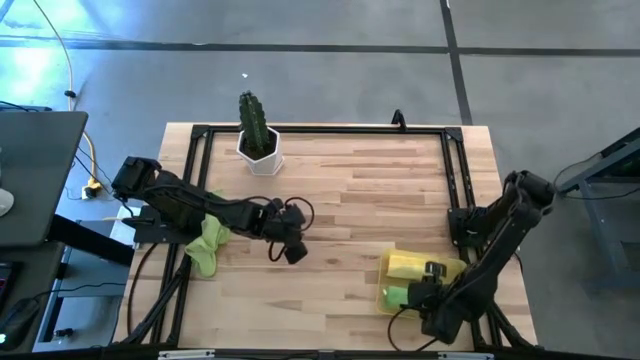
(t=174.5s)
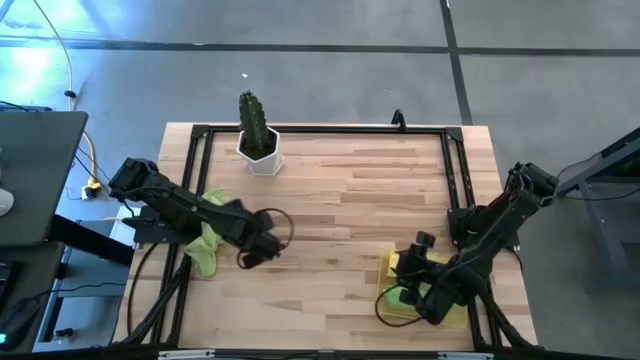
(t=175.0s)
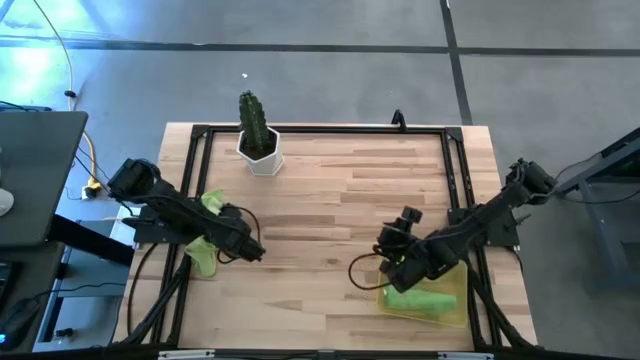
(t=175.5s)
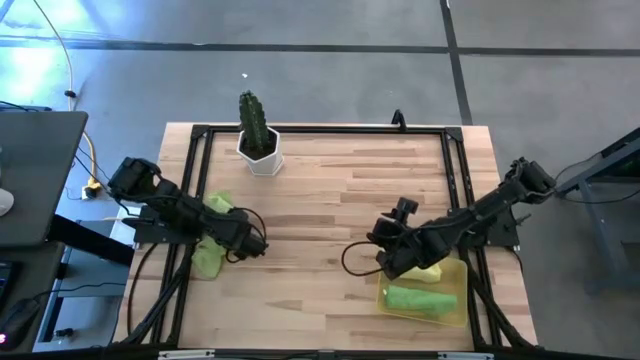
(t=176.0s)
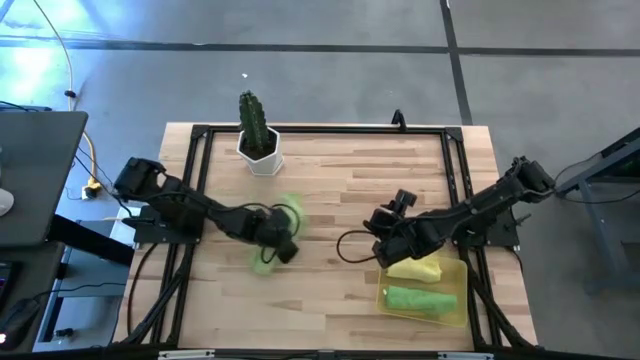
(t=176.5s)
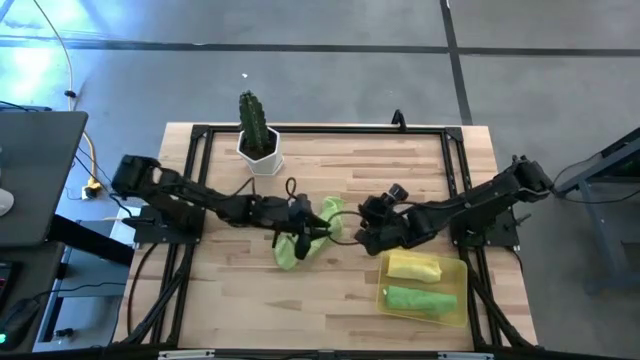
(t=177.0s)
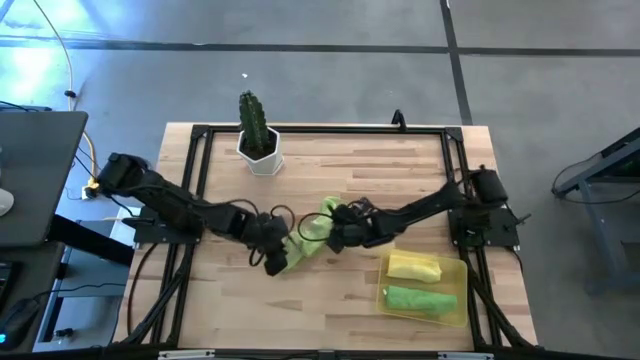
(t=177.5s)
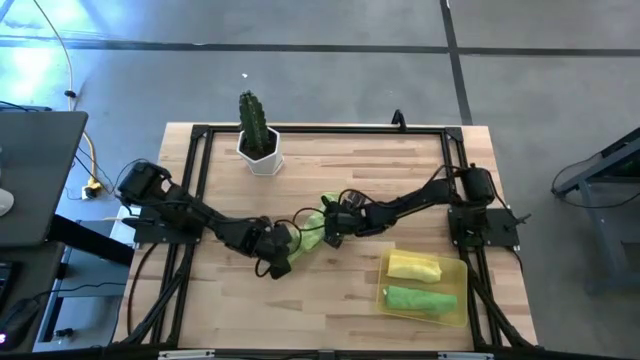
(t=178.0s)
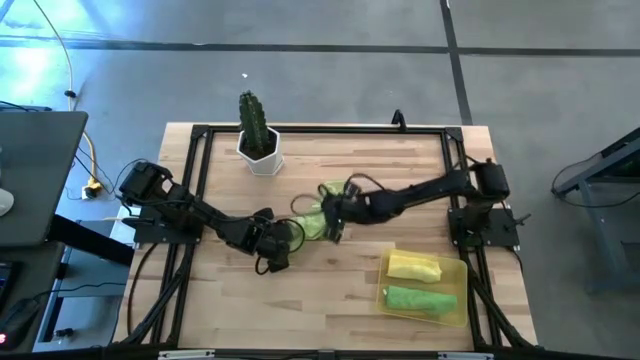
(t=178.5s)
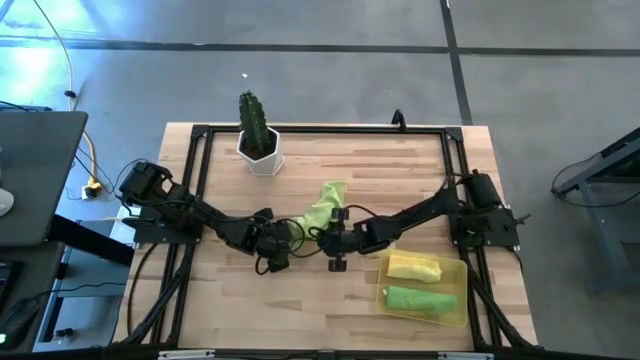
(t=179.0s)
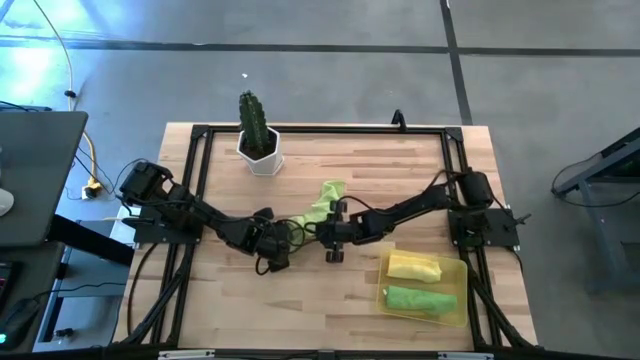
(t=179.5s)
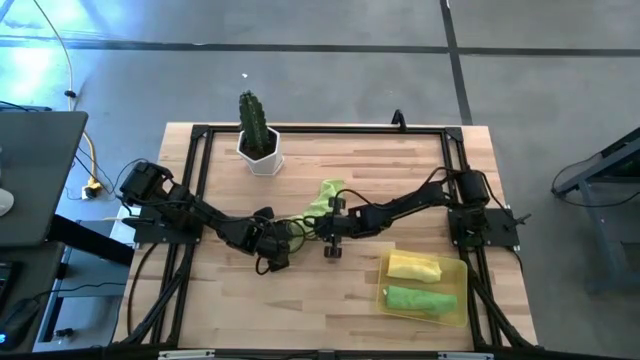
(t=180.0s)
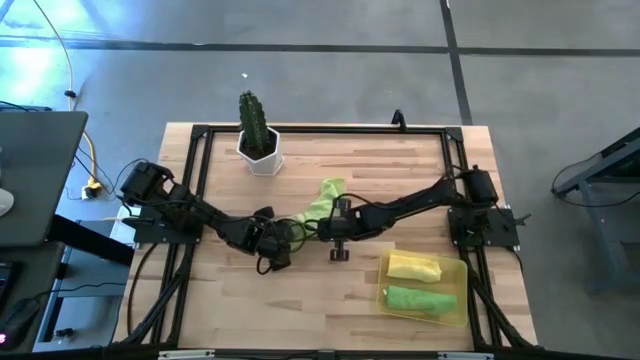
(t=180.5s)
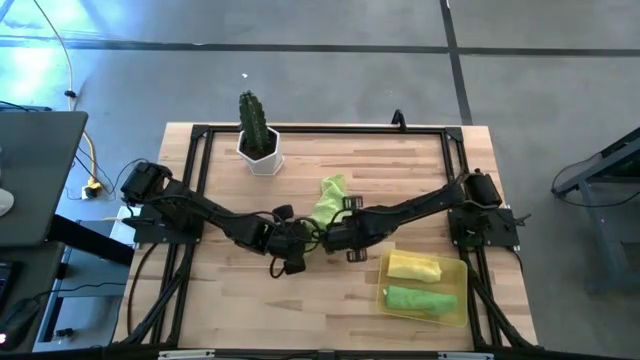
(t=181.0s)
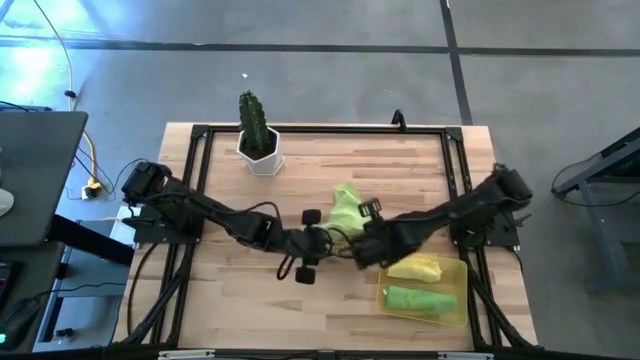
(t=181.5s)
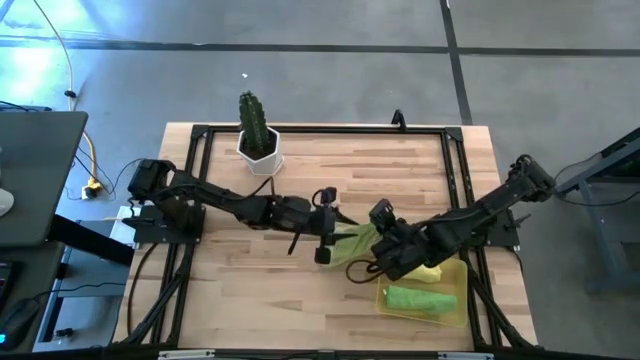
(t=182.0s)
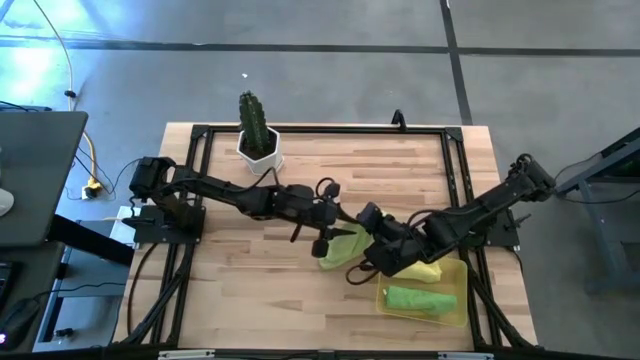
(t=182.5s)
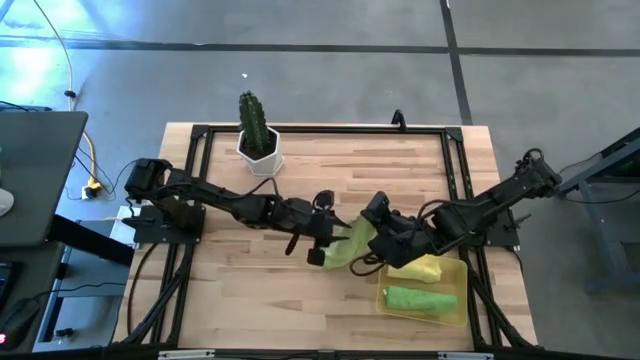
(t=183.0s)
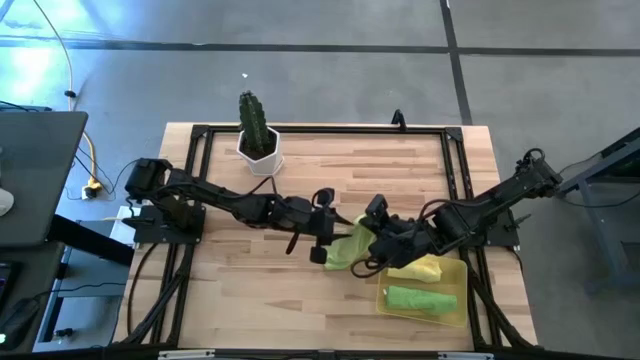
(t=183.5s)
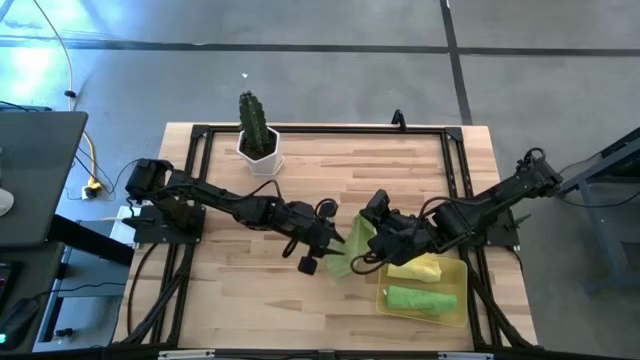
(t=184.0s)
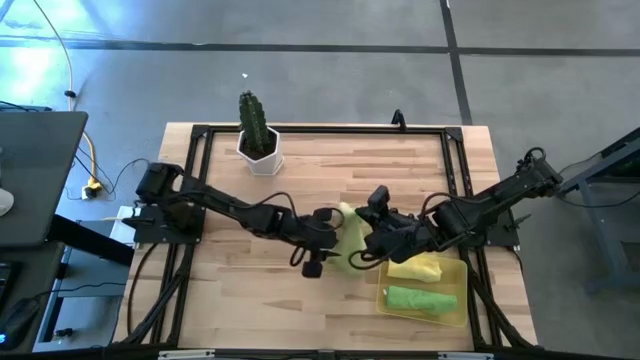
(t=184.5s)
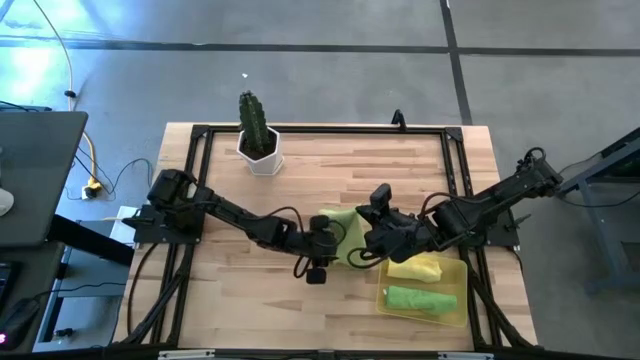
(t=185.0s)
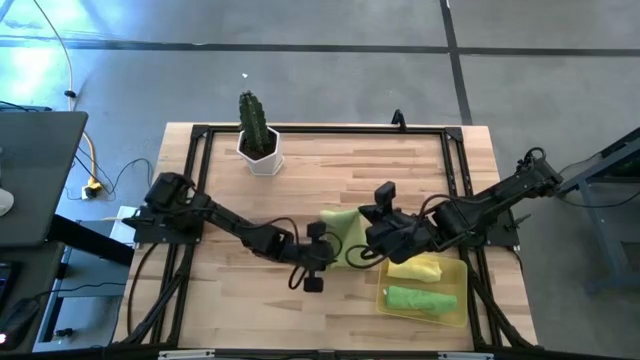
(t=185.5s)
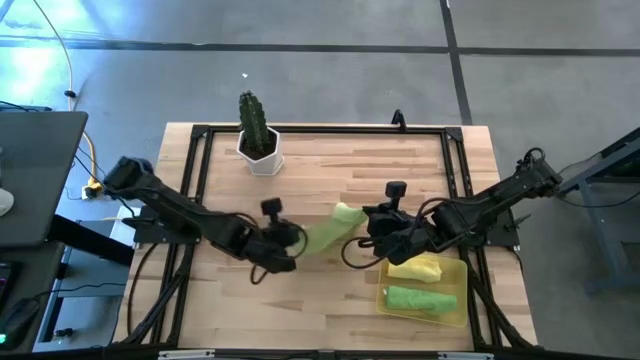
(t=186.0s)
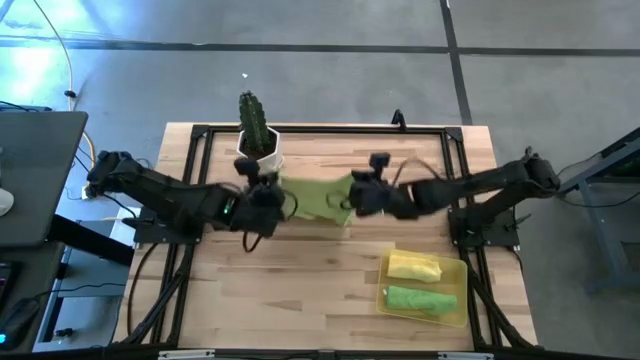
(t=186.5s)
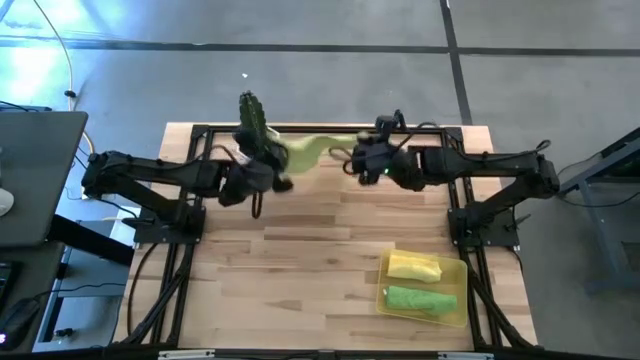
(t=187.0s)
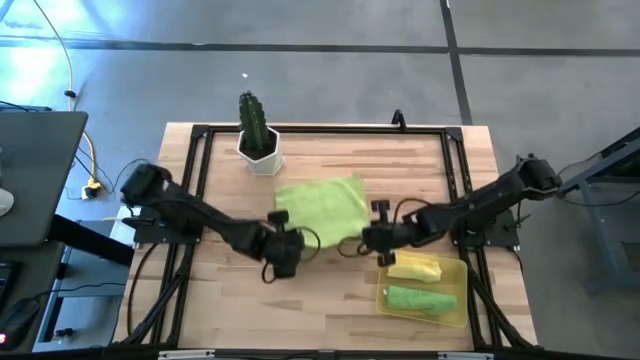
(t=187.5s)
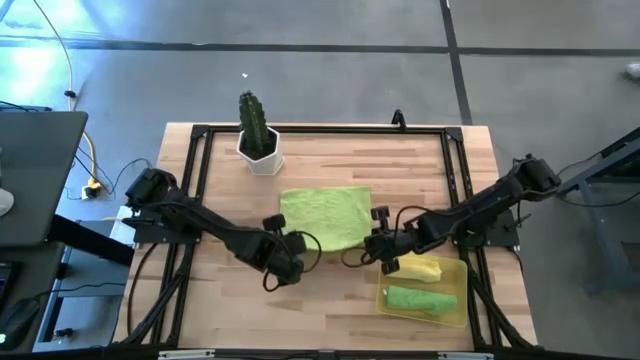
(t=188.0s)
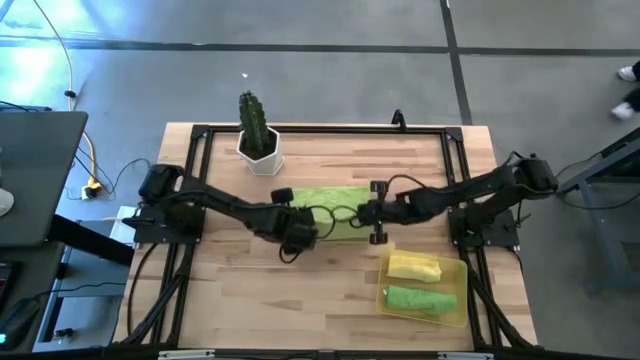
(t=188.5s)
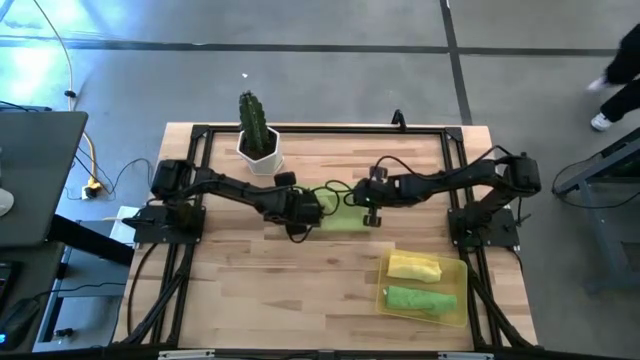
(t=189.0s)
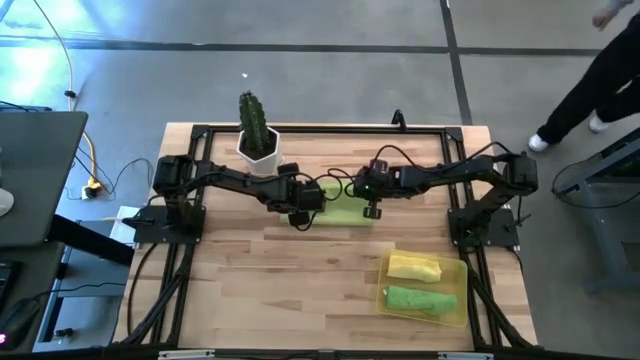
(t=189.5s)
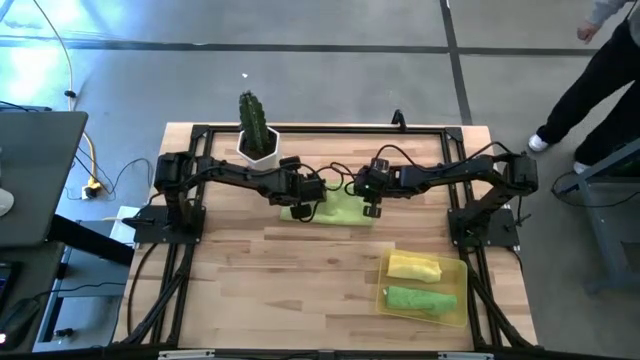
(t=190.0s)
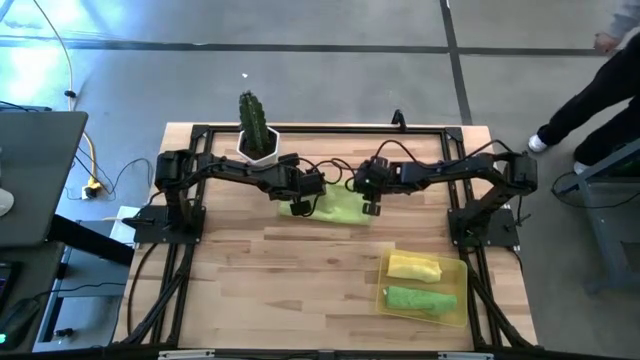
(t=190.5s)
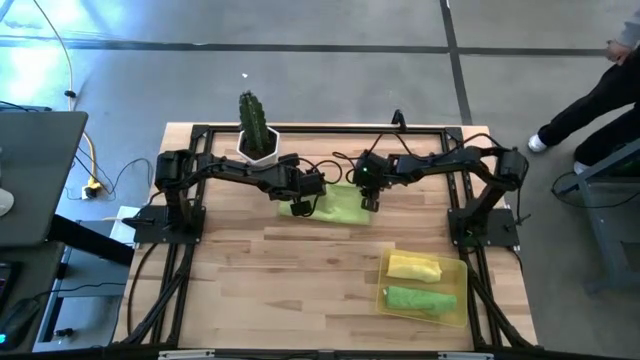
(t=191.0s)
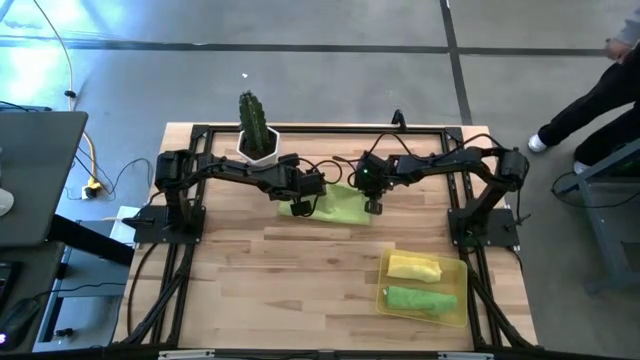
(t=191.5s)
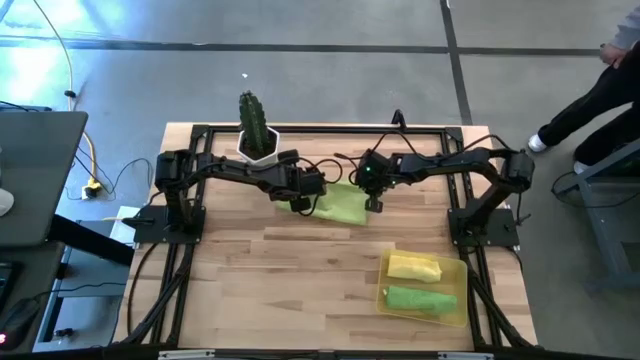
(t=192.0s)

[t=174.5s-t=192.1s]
Task: Roll microfiber towels into tight, uniform cylinder then place into a basket
Fold the light green towel

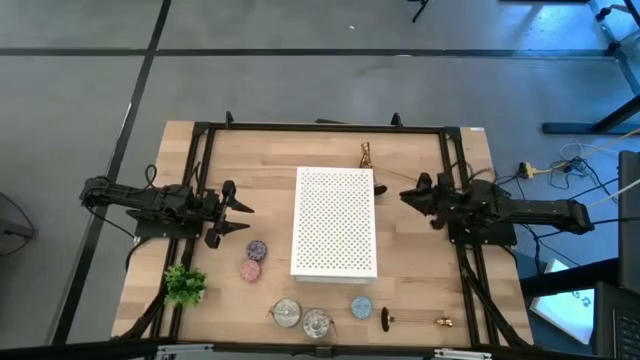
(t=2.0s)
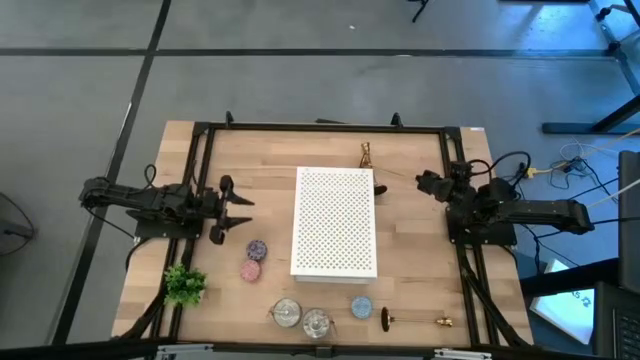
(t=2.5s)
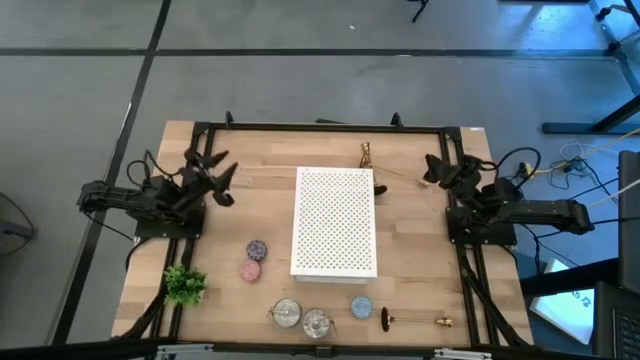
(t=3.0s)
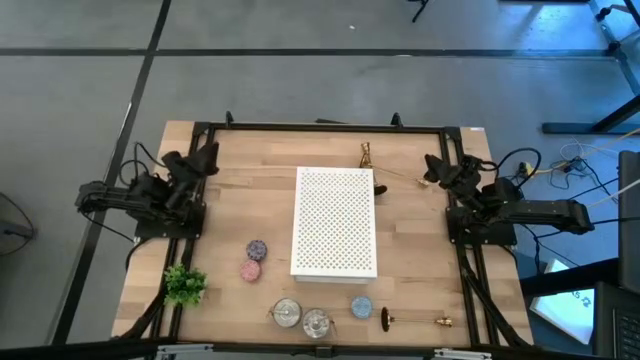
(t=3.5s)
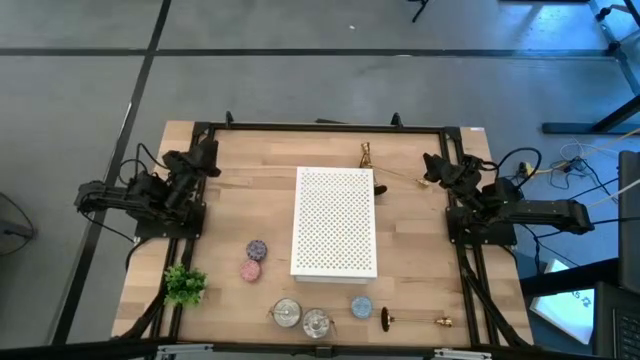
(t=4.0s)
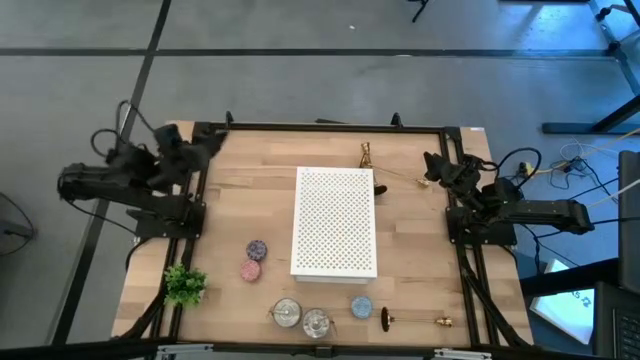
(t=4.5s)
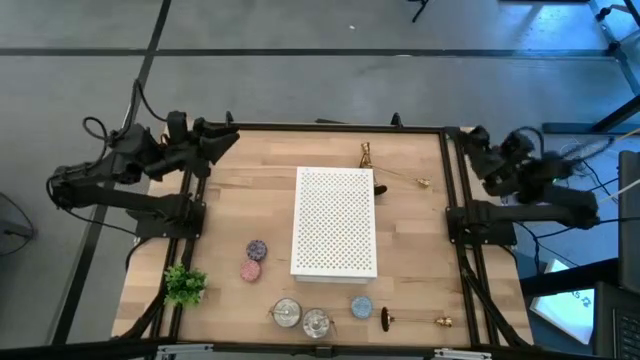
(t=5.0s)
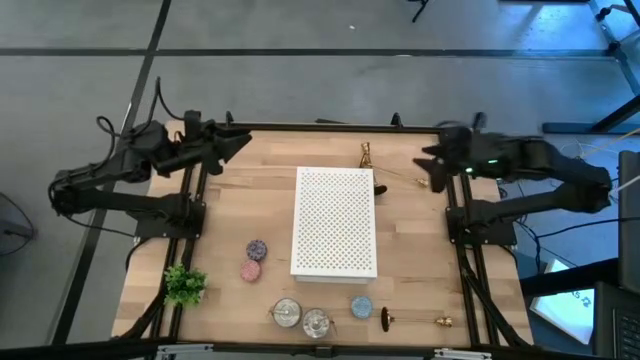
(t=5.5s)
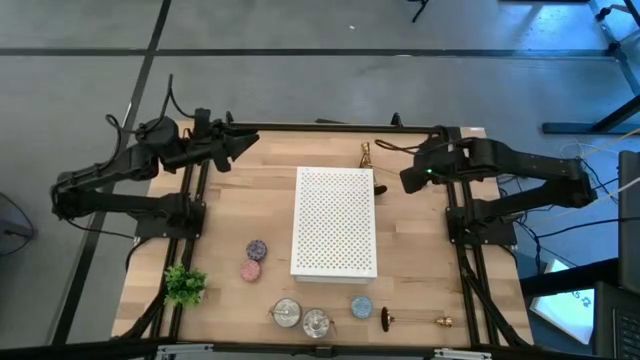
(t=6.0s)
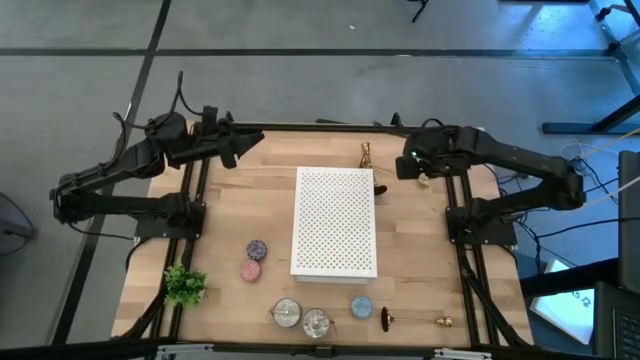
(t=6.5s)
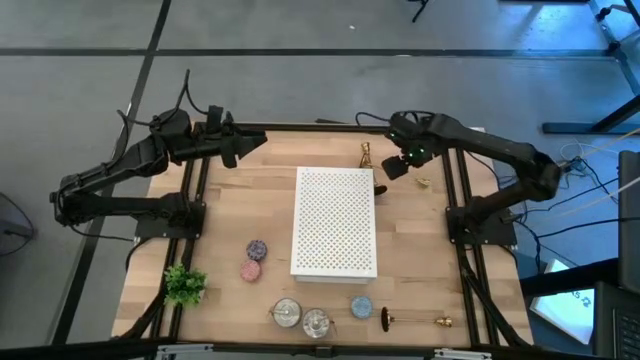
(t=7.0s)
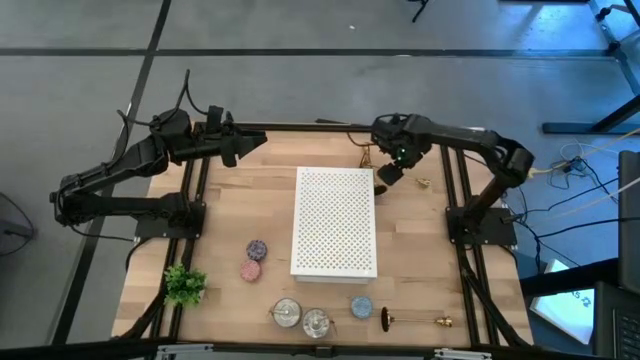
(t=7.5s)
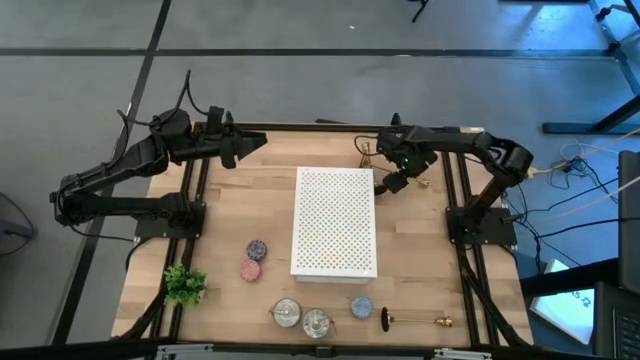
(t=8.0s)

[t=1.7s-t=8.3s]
Task: Pick & Place candle stick holders
Put the top right gold candle holder on the shelf
